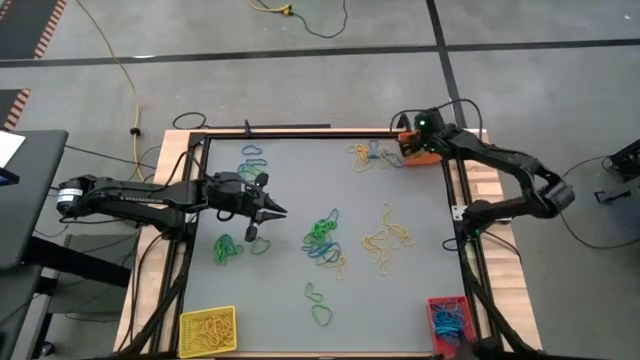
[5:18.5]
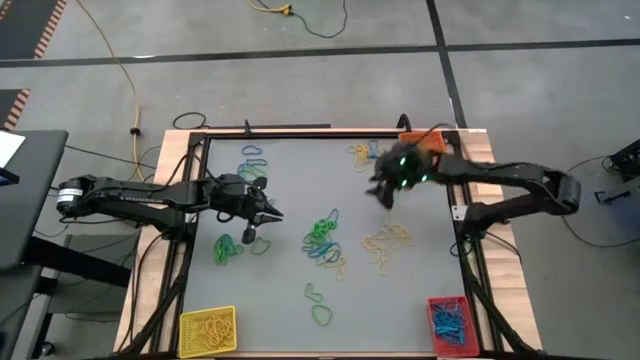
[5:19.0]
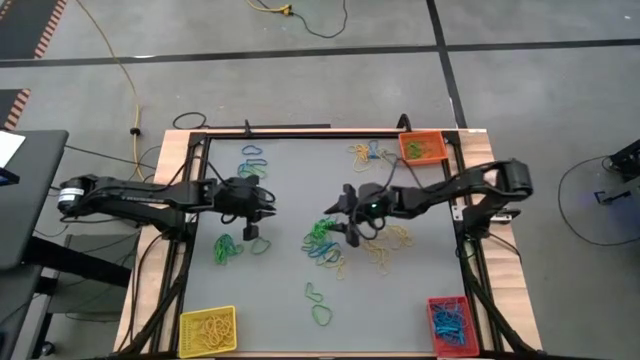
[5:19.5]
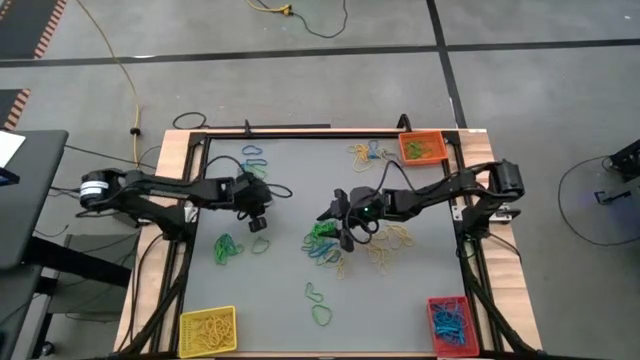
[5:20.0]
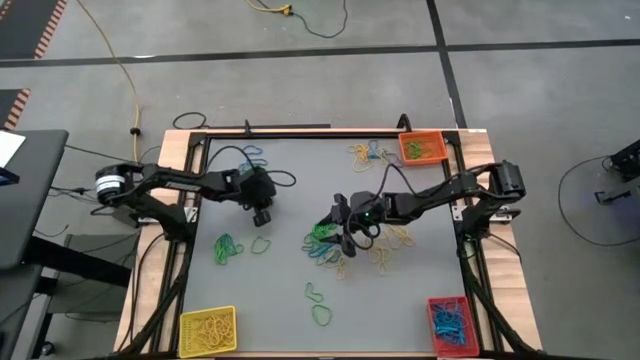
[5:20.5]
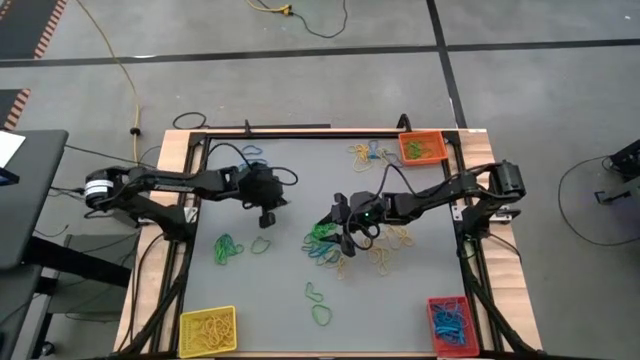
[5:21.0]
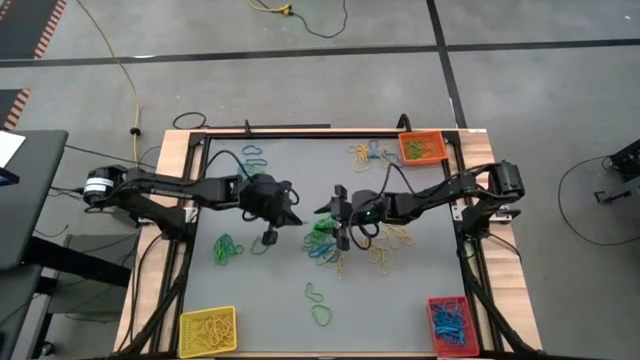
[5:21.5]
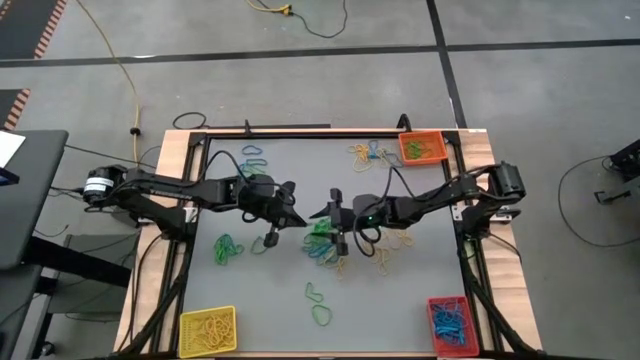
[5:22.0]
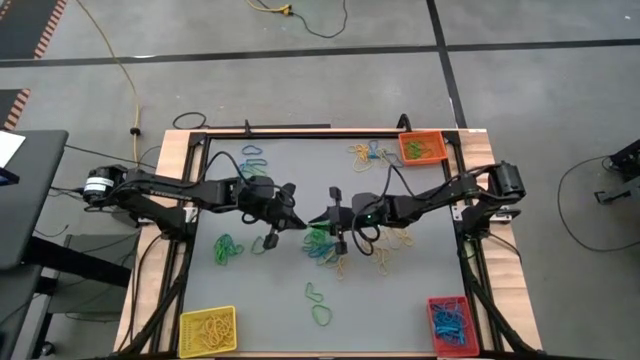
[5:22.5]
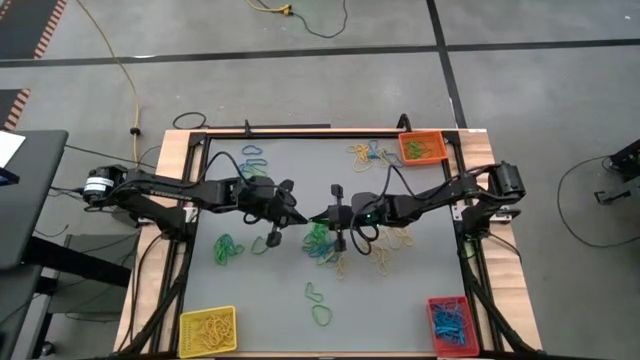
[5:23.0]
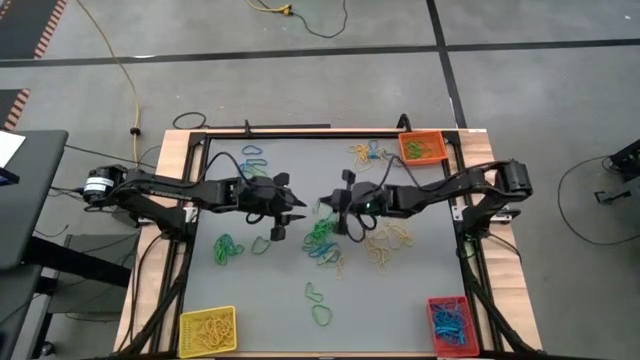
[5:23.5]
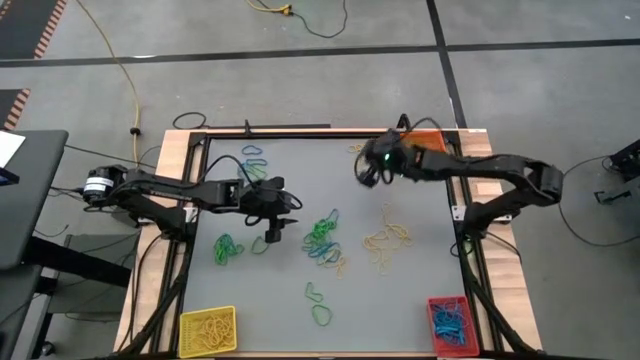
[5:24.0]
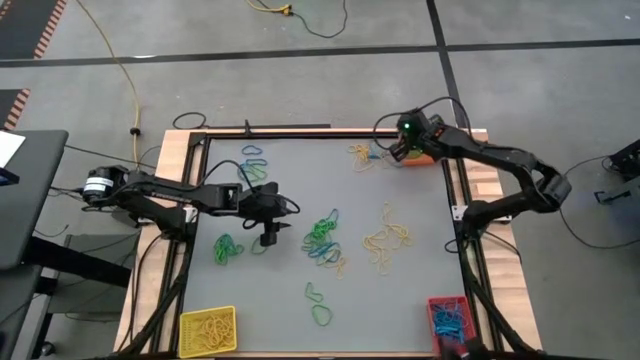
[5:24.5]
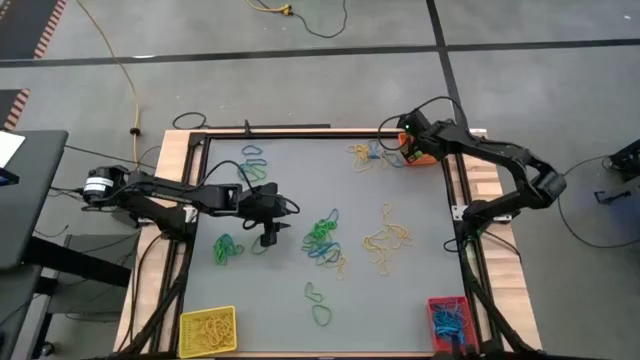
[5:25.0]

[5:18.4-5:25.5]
Task: Sort rubber bands into baskets
Put the green rubber band into the orange bin

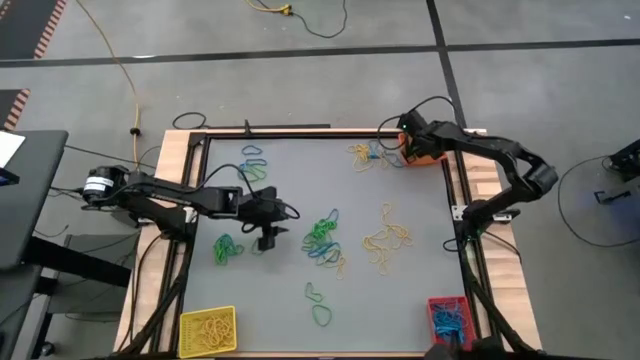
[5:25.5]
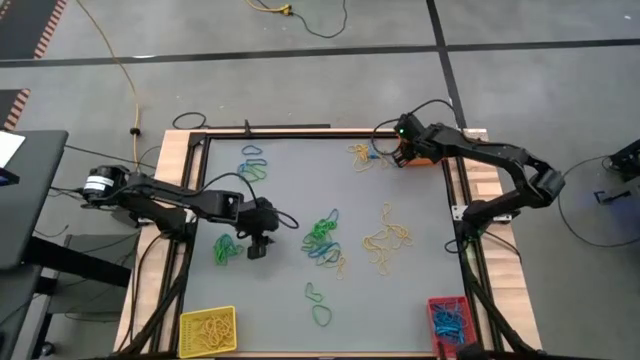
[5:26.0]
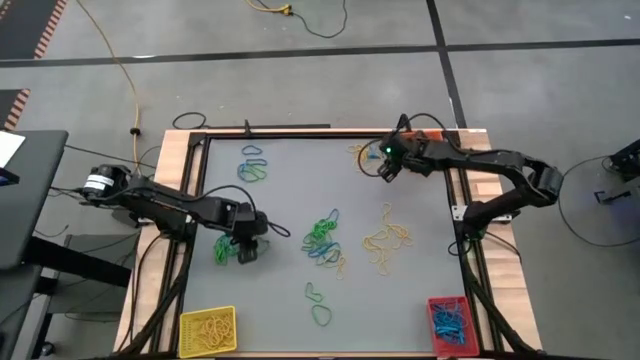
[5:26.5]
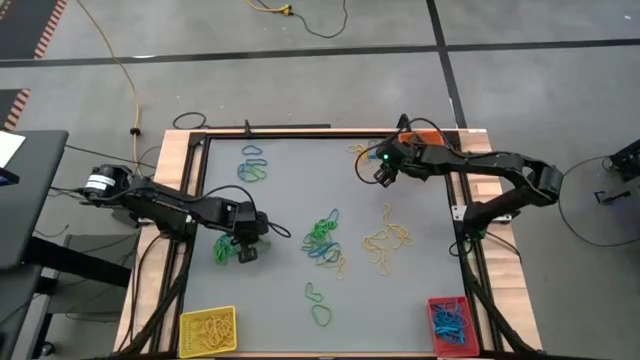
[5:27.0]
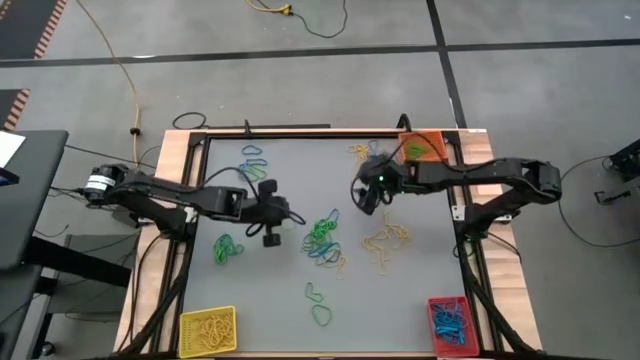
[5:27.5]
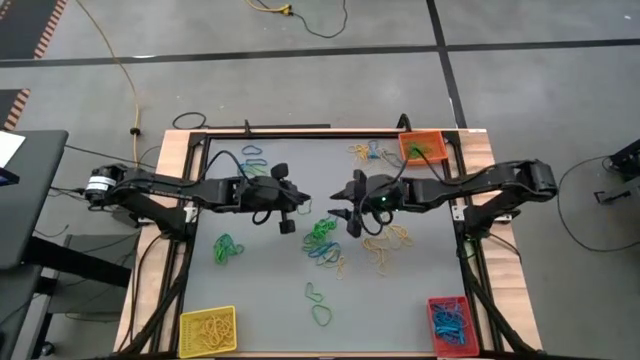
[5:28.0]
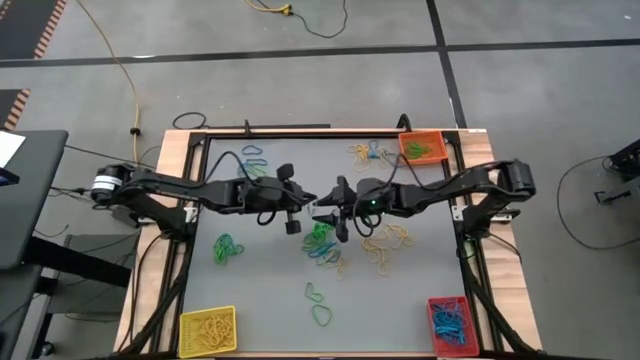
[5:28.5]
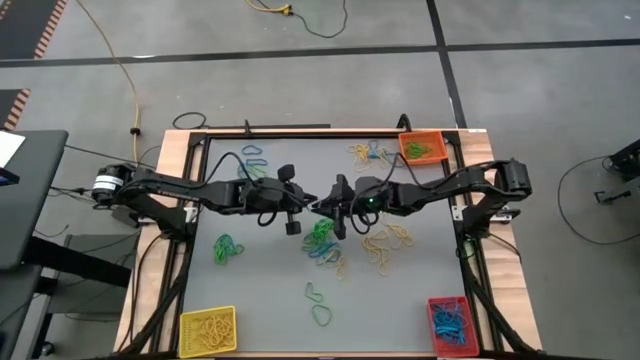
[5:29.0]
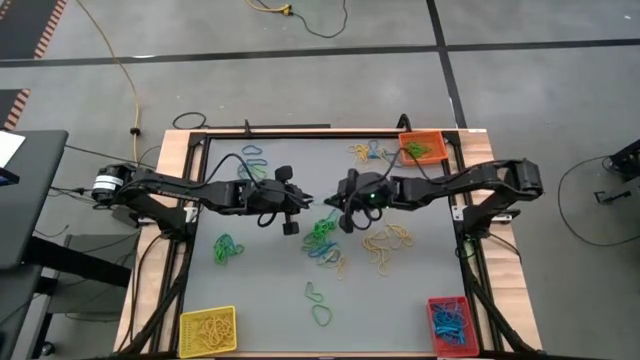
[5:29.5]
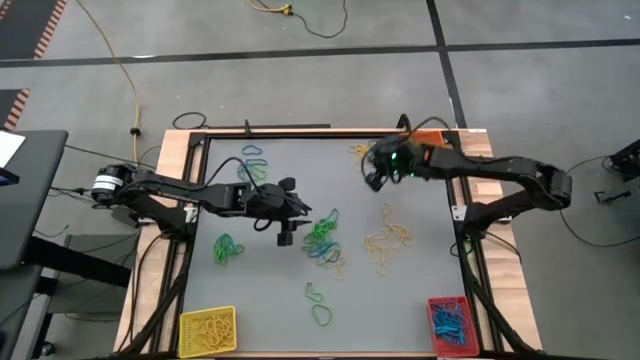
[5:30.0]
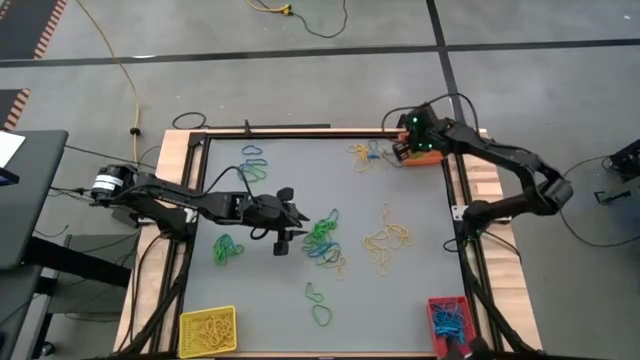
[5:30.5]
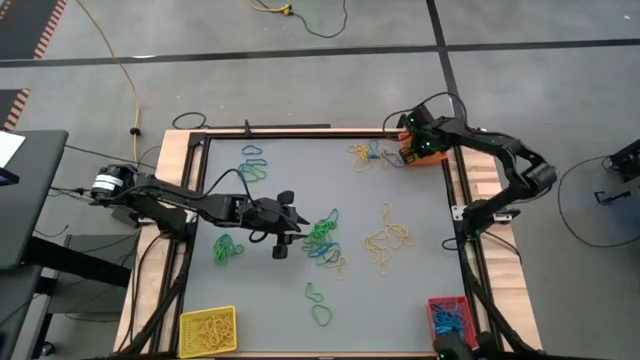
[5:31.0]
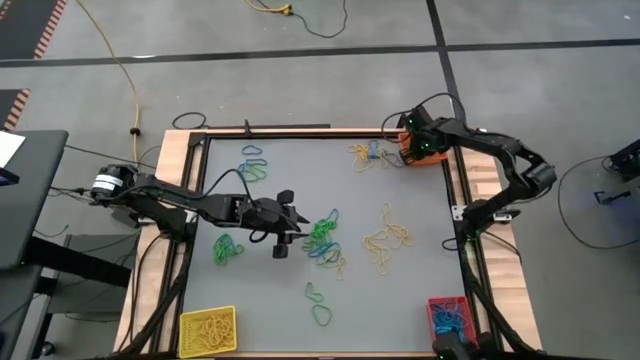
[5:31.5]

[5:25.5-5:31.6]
Put the green rubber band into the orange bin

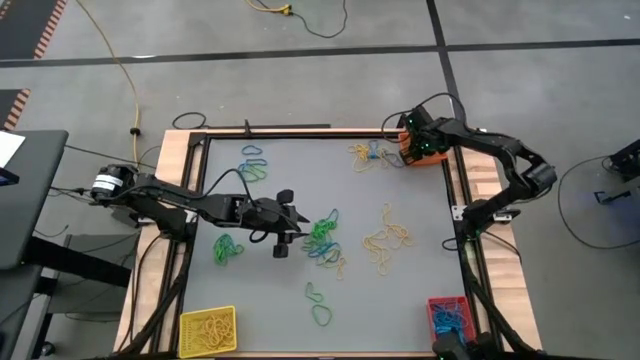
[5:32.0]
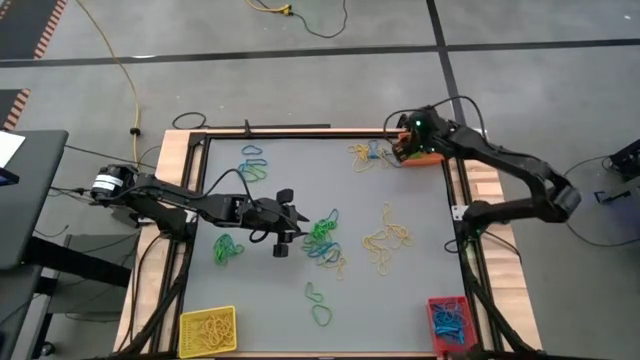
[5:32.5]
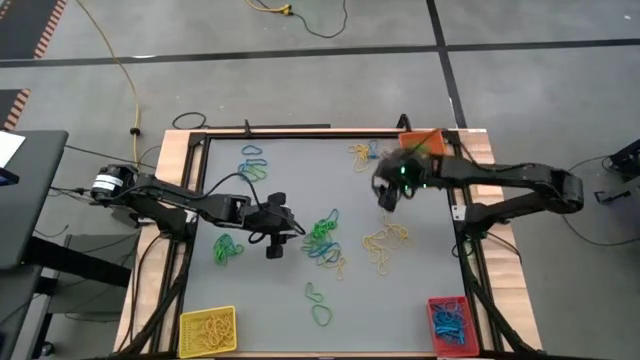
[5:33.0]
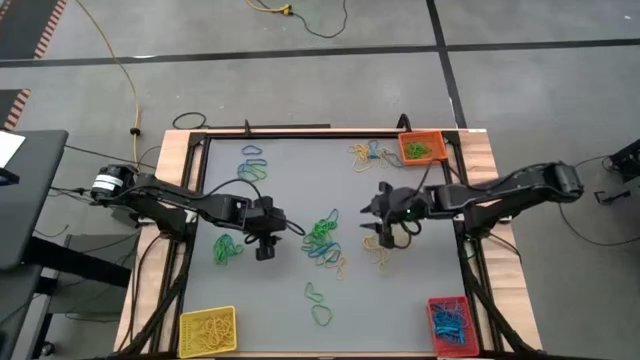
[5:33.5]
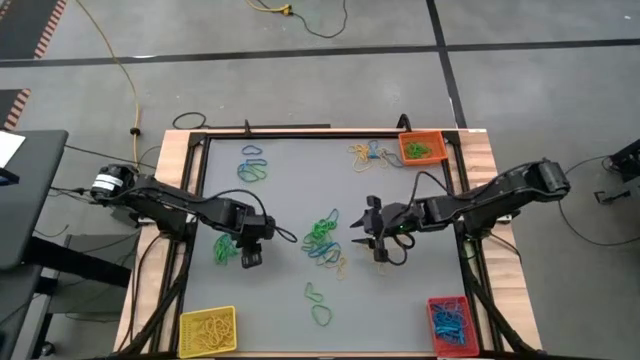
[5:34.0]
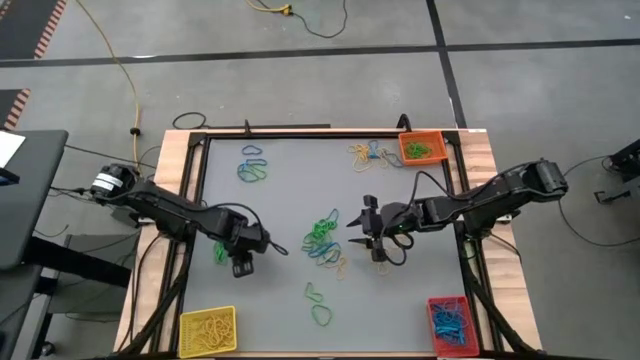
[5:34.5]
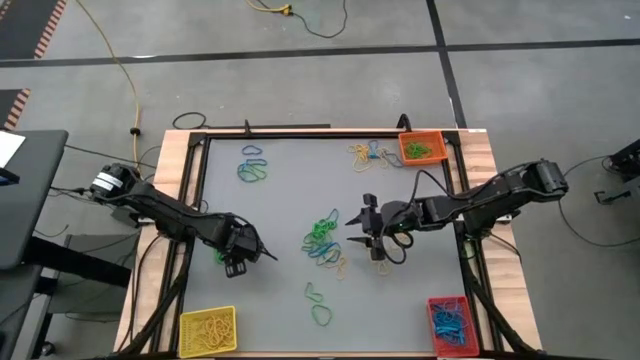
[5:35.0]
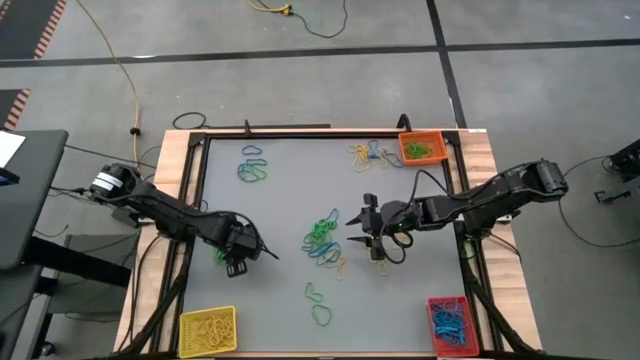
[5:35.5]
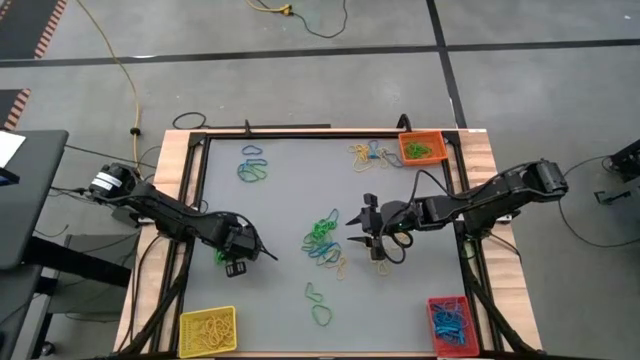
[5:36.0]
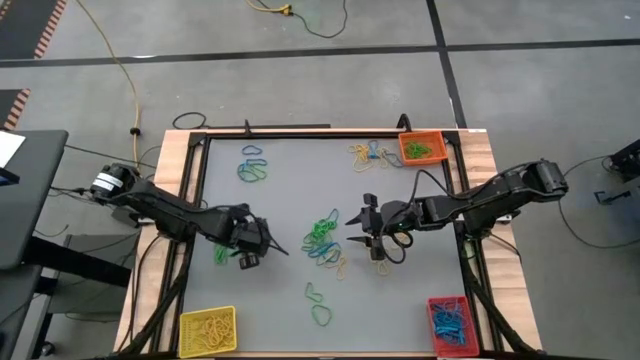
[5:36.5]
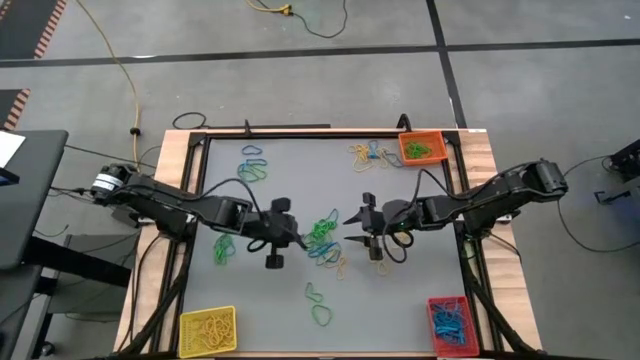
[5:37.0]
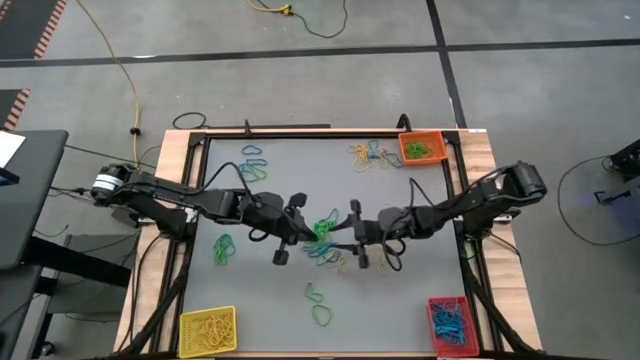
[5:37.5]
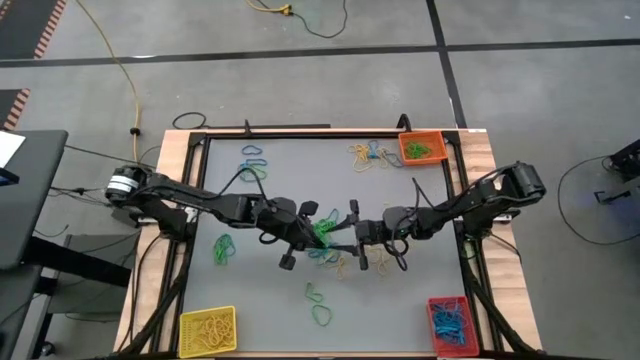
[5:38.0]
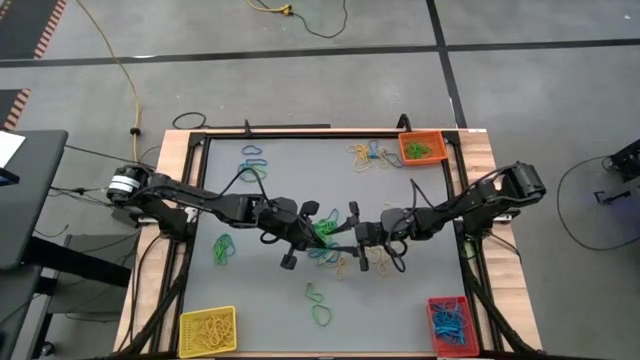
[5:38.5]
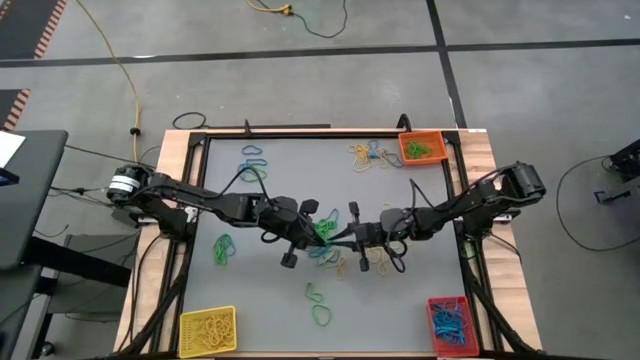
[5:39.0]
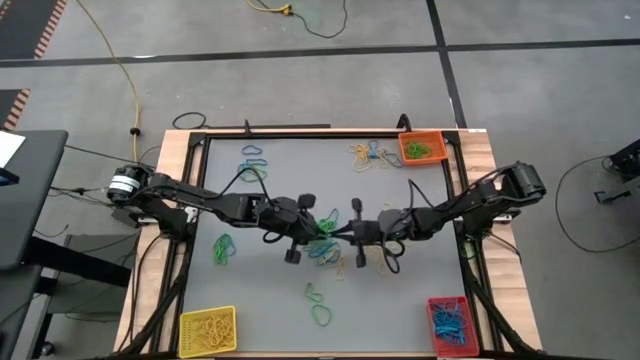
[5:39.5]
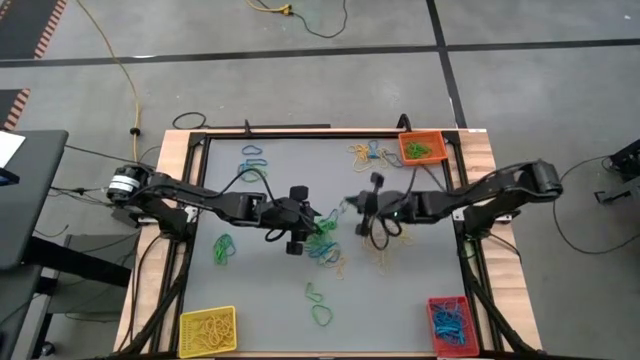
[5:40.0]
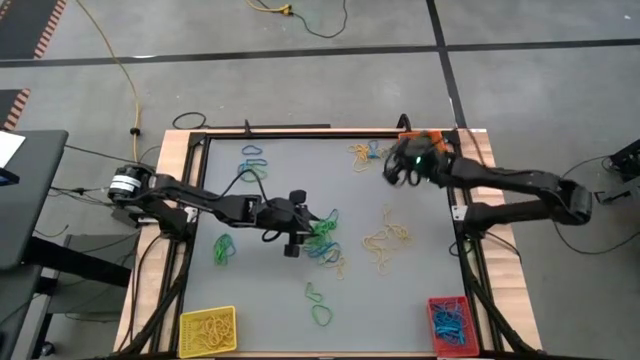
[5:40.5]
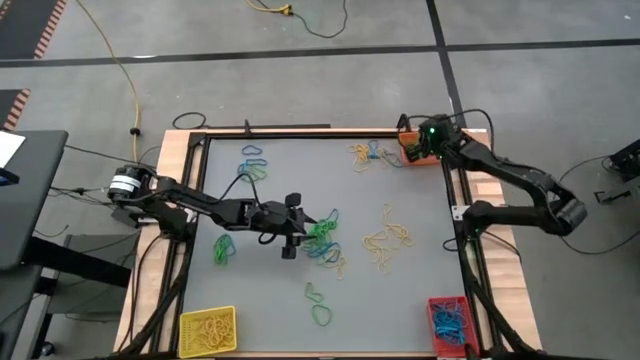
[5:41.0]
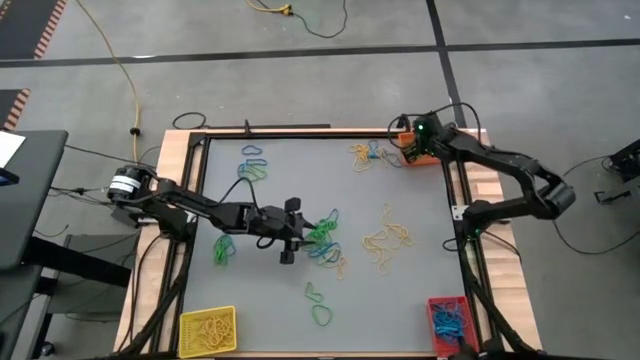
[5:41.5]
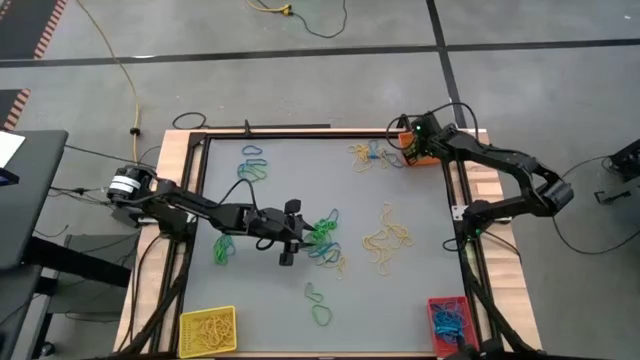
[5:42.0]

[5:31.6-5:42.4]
Put the green rubber band into the orange bin
